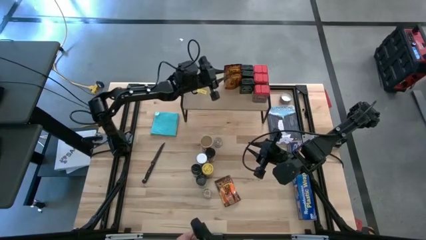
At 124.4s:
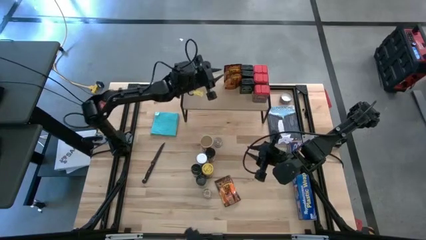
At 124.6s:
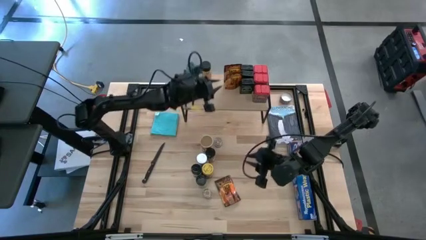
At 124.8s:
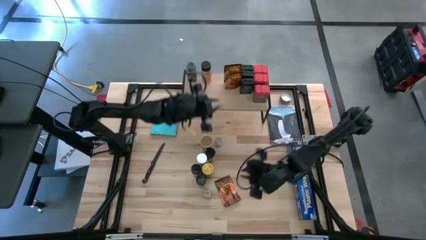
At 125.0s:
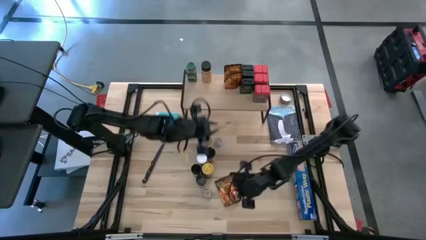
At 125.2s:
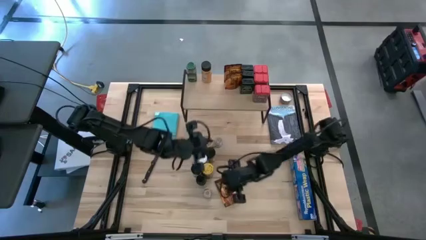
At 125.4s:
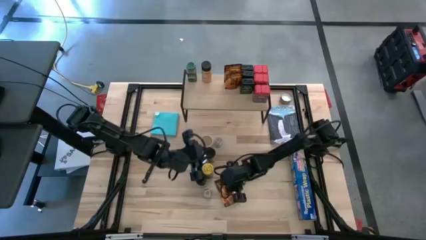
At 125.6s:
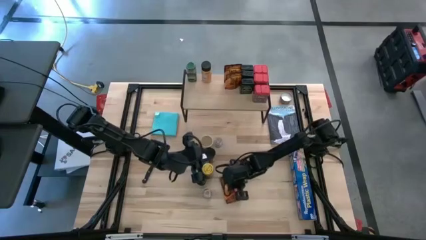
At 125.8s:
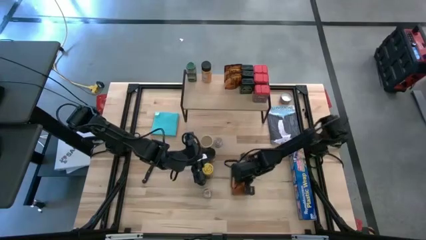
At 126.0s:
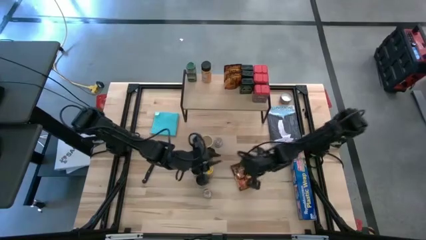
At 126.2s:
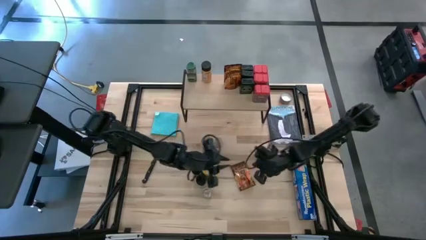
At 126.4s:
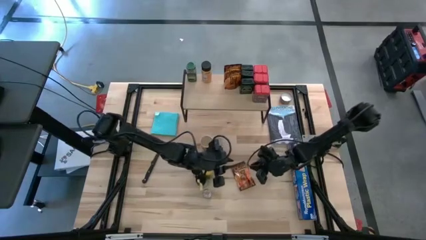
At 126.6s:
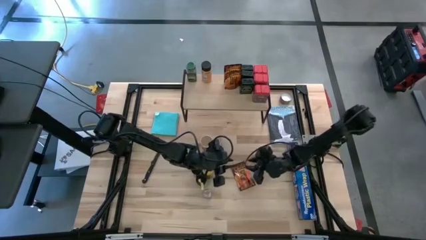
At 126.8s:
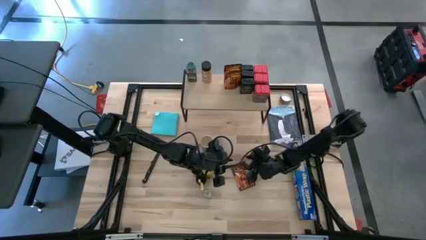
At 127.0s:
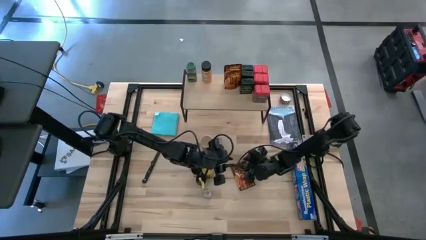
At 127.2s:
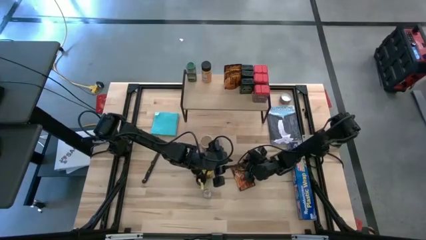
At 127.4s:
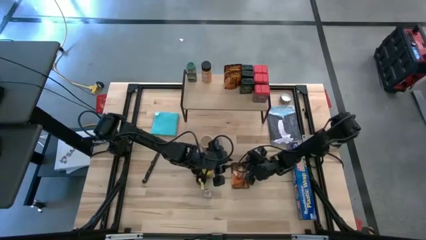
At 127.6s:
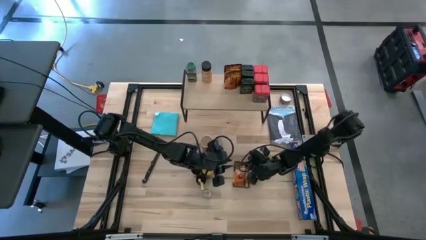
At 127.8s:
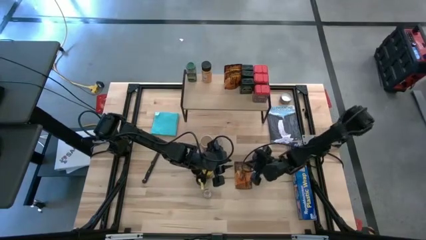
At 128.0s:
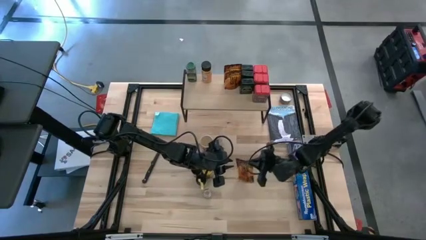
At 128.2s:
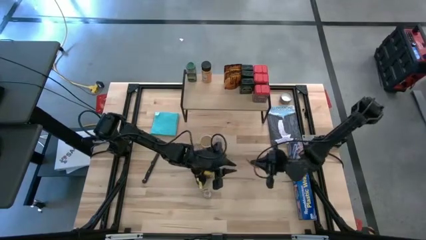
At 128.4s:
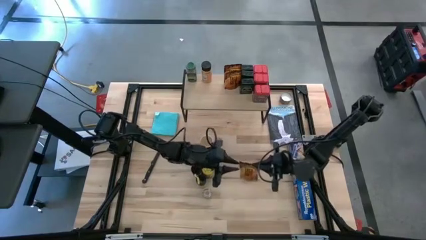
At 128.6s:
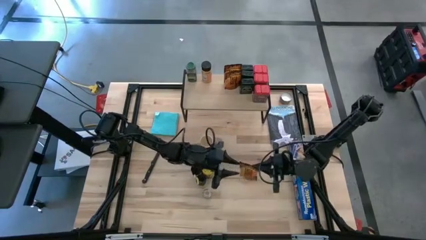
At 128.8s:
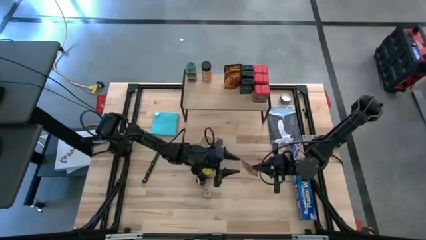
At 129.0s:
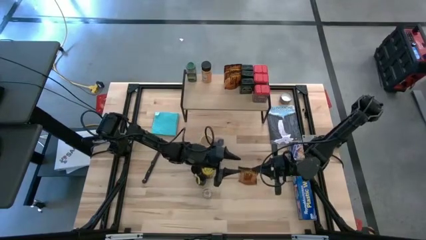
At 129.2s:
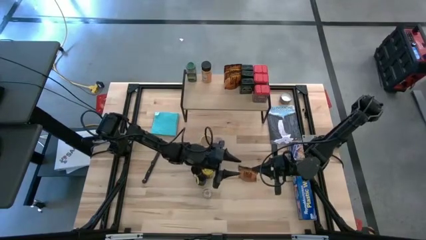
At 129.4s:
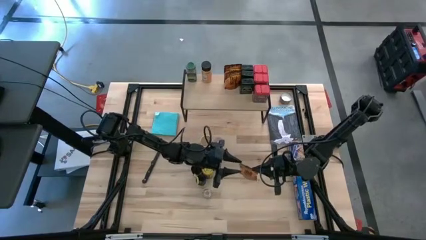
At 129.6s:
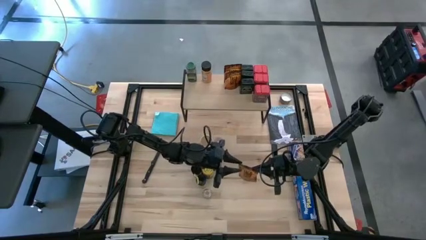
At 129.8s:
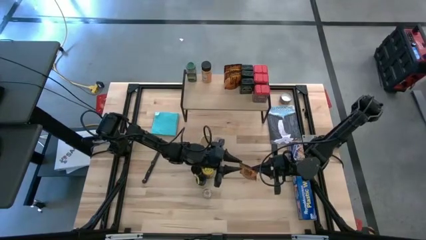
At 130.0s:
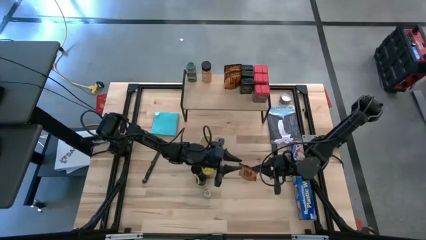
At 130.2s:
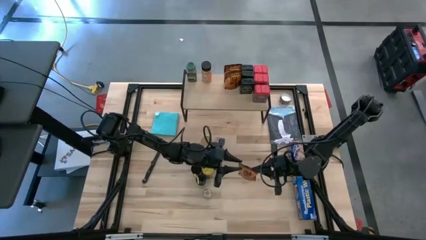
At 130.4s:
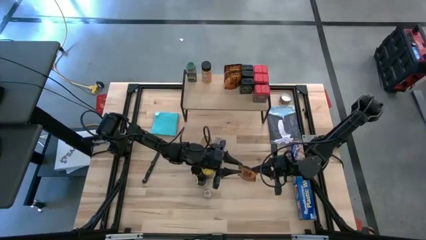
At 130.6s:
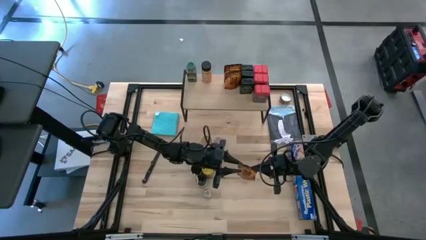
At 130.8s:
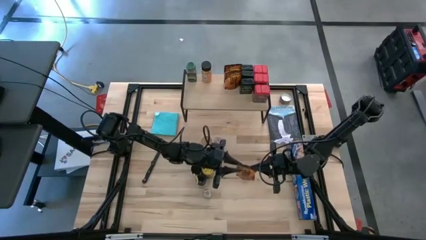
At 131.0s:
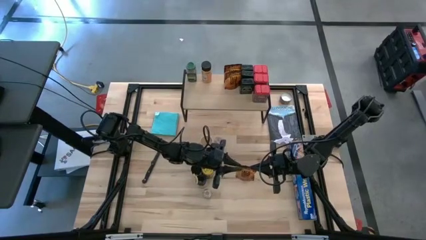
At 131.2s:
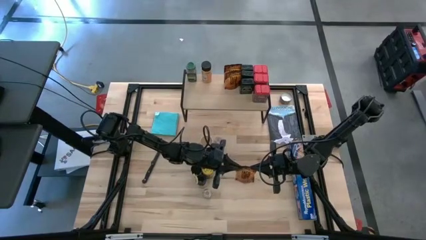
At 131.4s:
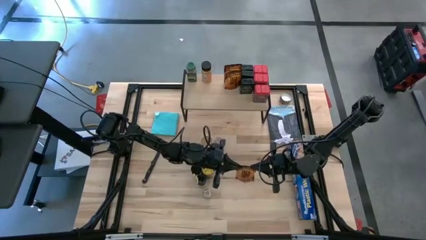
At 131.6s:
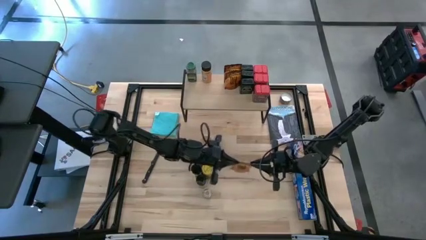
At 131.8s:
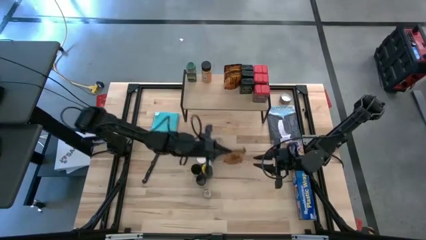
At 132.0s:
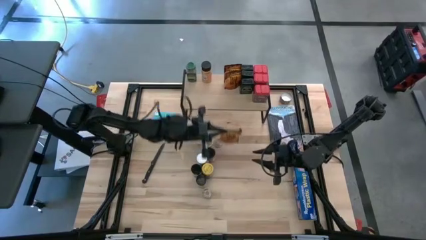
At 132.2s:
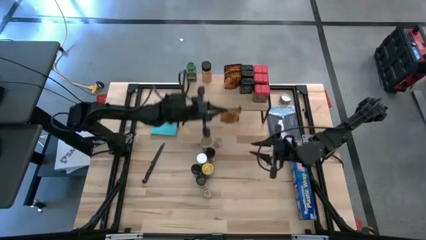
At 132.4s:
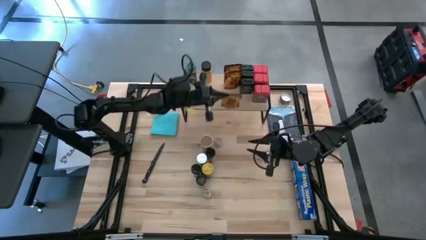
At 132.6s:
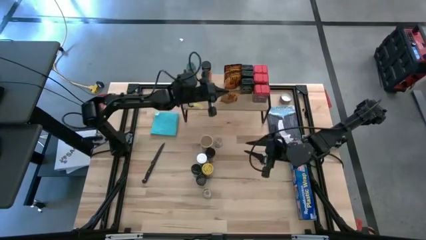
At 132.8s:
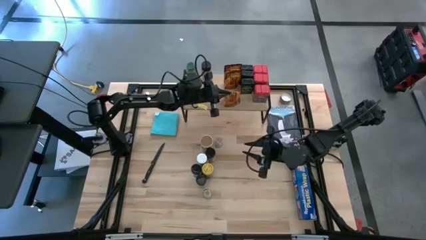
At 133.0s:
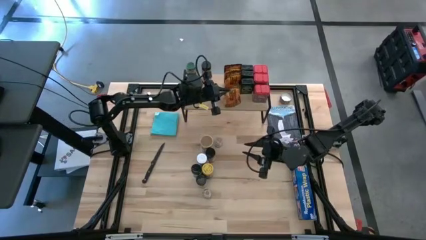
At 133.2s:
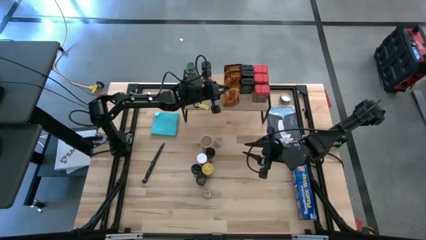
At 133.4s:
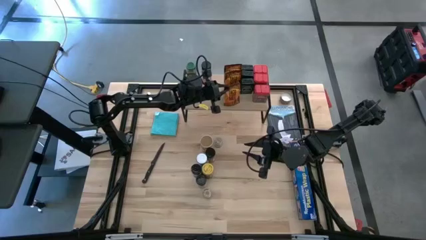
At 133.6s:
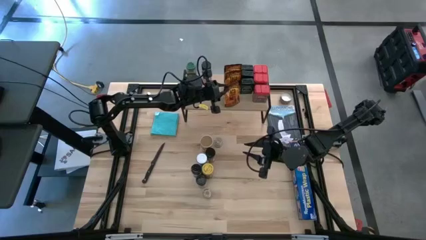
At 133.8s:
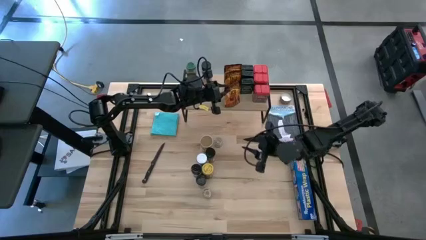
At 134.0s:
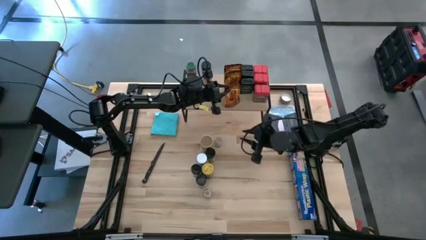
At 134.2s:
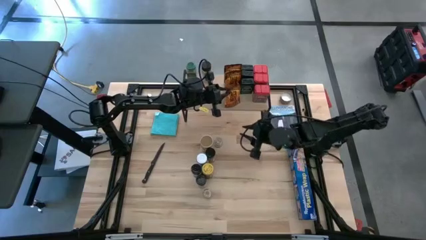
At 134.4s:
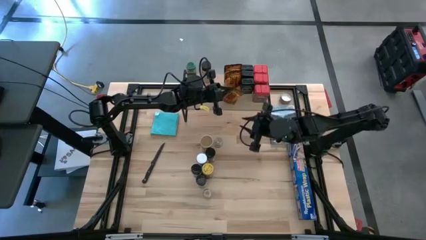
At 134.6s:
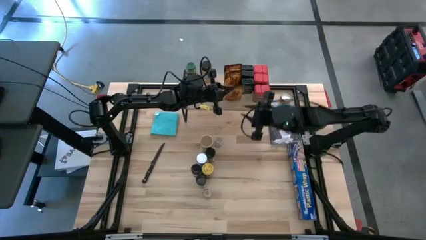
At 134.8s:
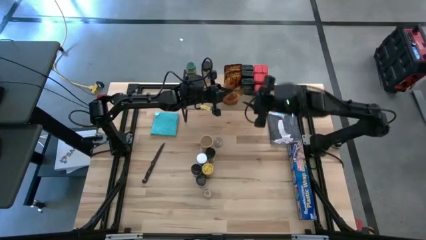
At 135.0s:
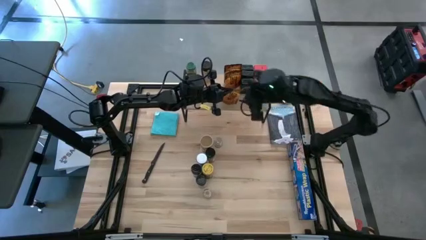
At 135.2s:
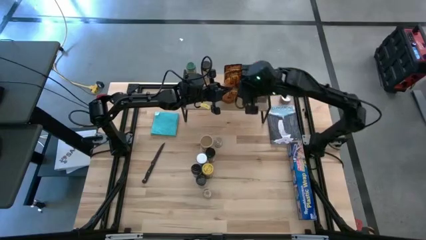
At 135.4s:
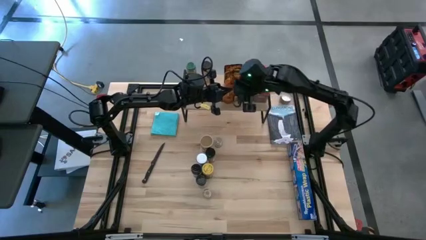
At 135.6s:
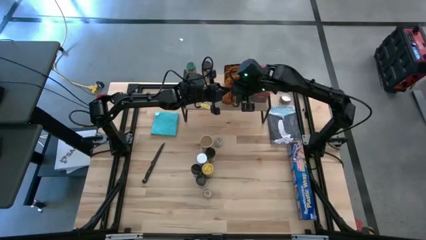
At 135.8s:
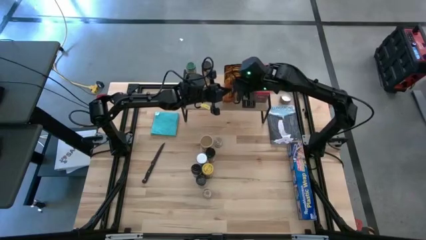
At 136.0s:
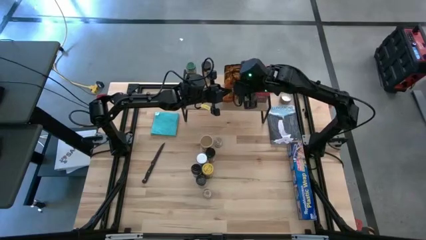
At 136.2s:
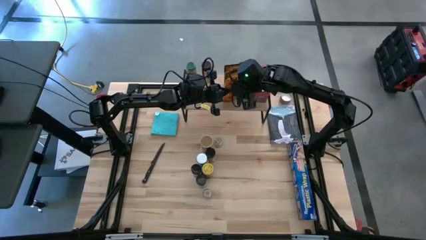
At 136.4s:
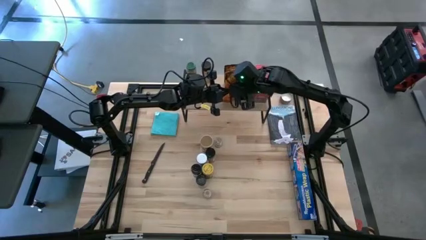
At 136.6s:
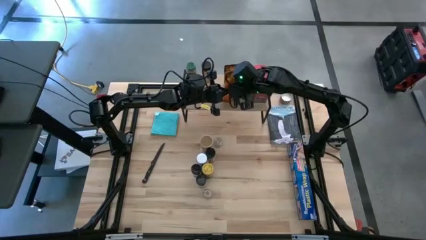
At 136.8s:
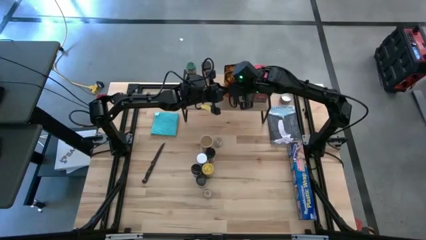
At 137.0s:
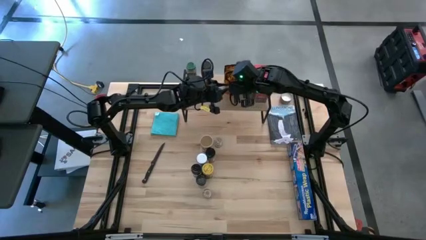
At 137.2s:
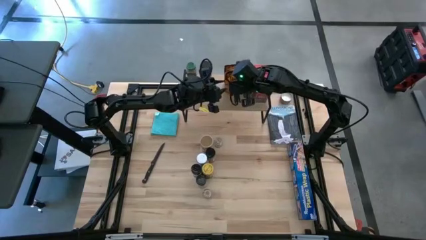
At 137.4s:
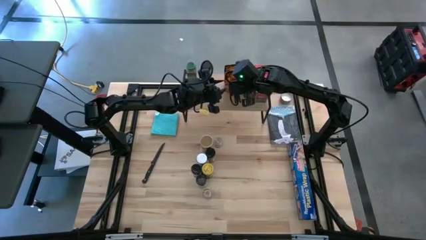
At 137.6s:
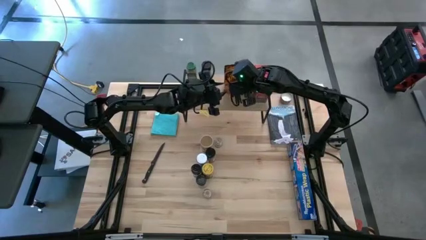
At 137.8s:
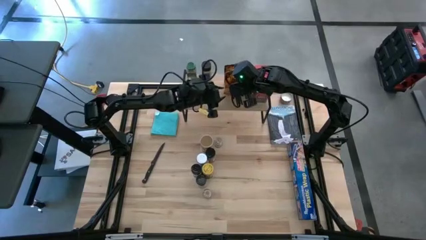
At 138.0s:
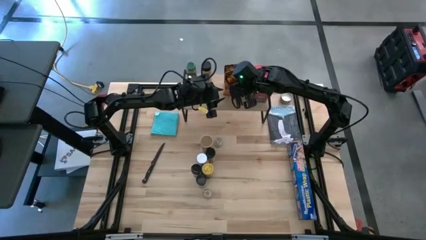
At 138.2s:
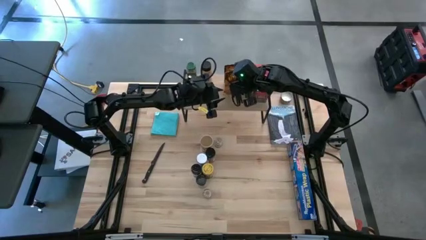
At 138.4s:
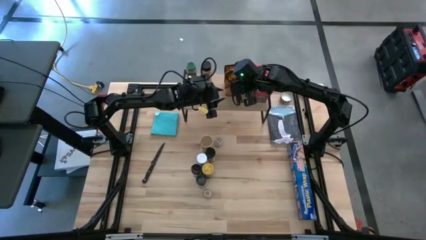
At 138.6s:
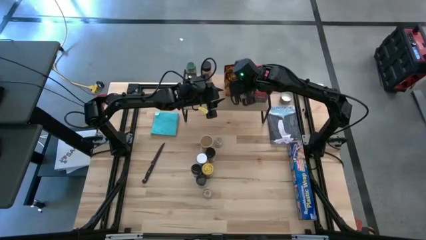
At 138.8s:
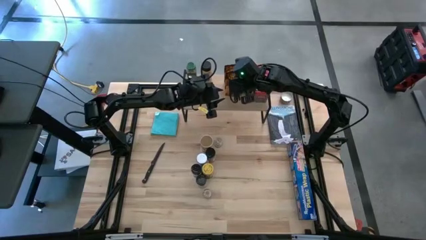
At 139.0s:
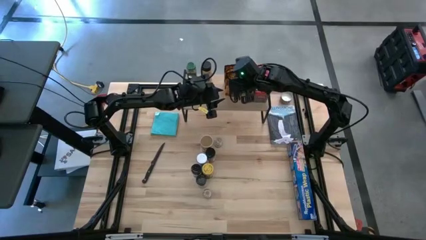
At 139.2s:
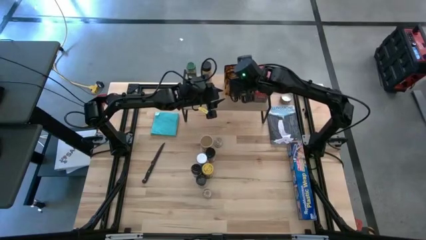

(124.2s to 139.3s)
Task: Shelf spices
Put the orange seasoning pack on the shelf

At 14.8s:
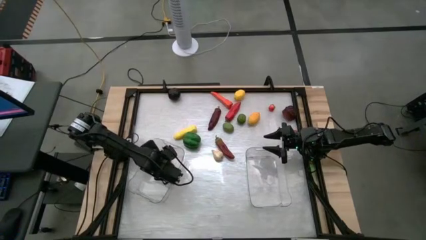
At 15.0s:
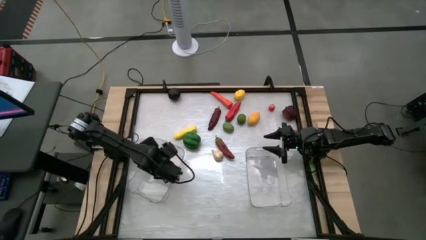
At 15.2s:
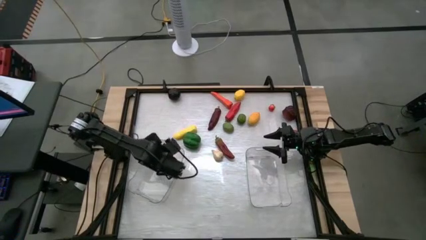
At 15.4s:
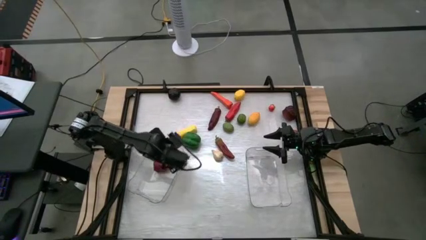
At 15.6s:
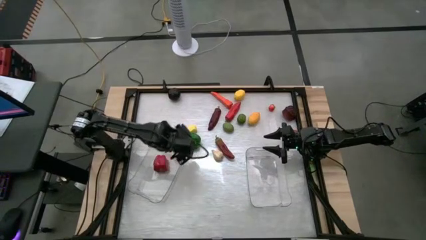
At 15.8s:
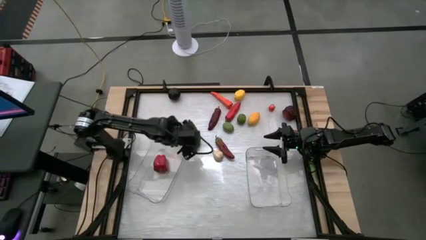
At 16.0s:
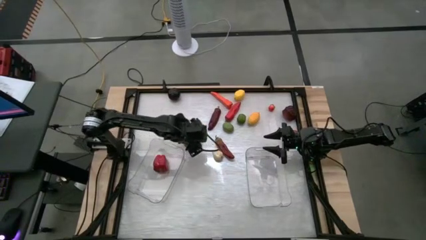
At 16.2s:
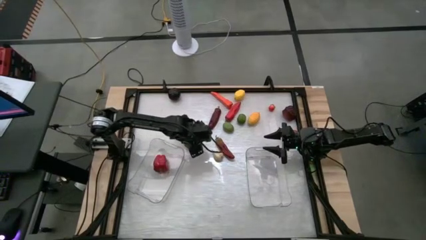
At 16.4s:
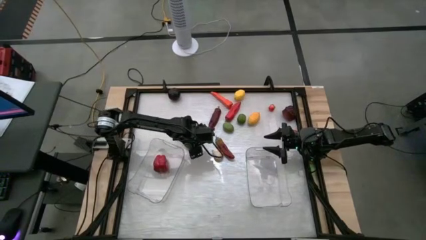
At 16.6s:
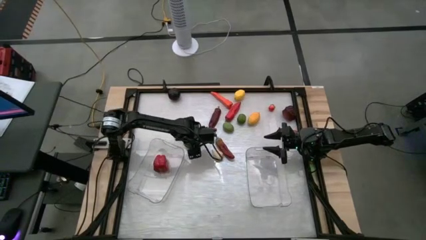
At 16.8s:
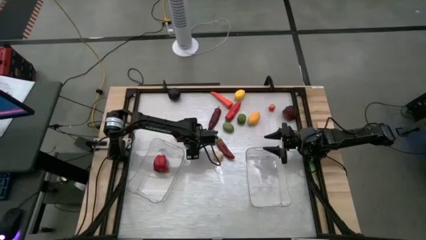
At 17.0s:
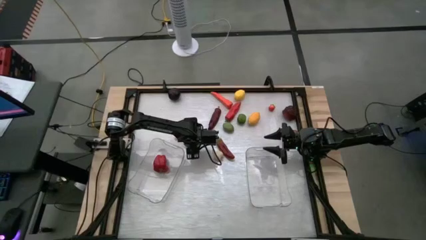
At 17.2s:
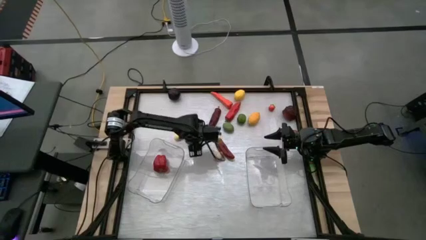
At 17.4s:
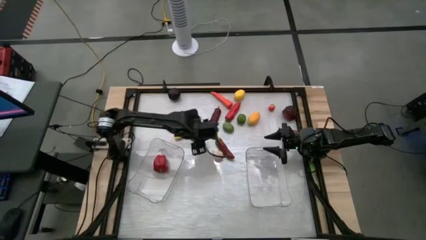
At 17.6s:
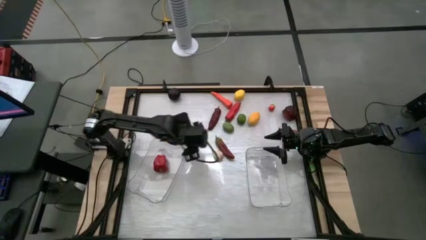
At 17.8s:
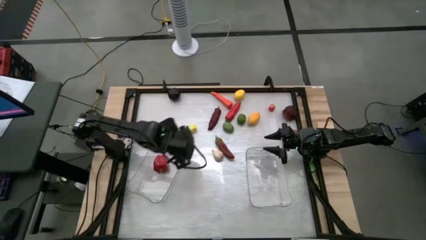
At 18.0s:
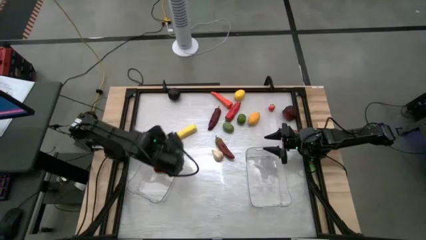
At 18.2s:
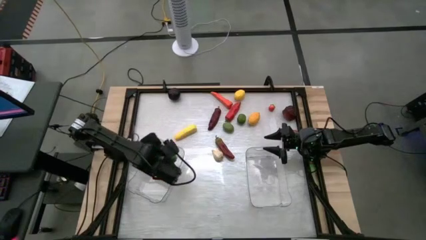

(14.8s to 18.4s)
Task: Sort produce into baskets
Put the green bell pepper into the left transparent bin
